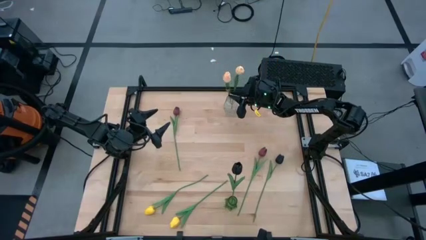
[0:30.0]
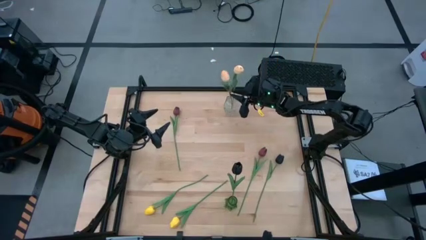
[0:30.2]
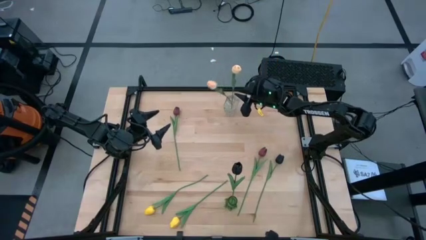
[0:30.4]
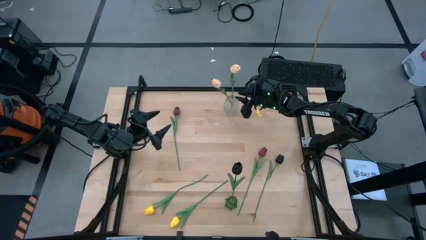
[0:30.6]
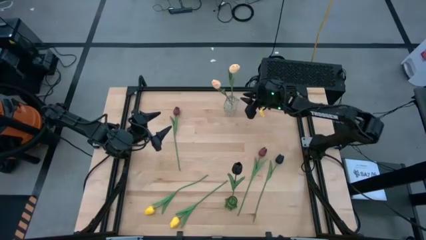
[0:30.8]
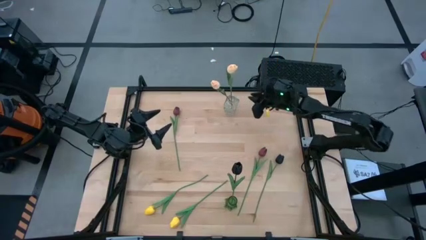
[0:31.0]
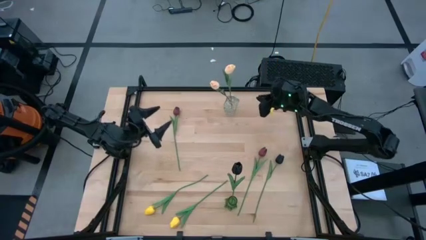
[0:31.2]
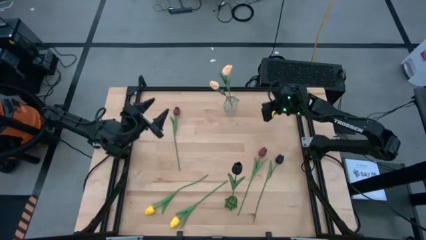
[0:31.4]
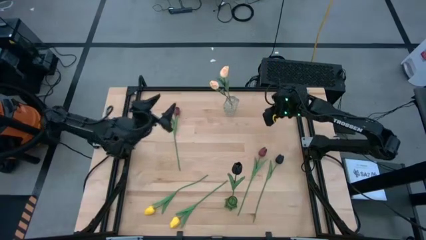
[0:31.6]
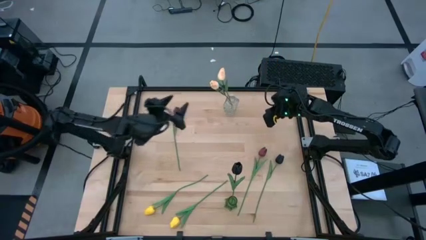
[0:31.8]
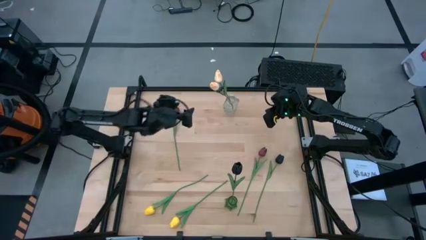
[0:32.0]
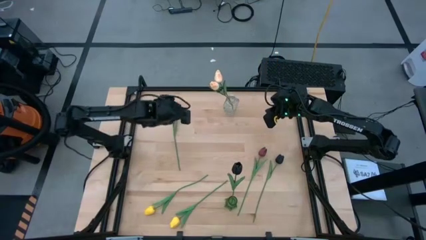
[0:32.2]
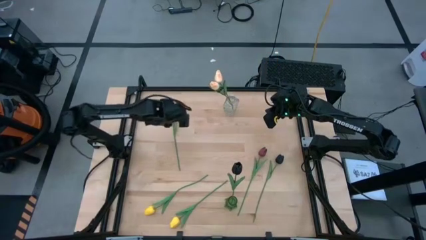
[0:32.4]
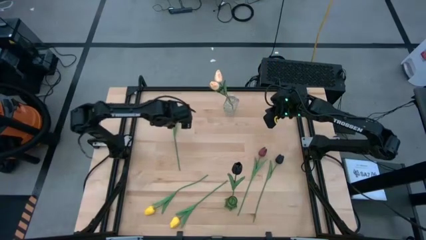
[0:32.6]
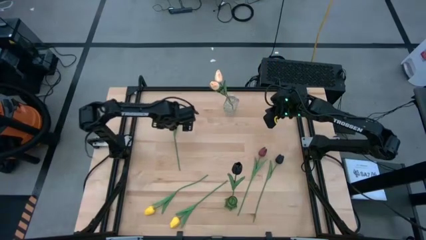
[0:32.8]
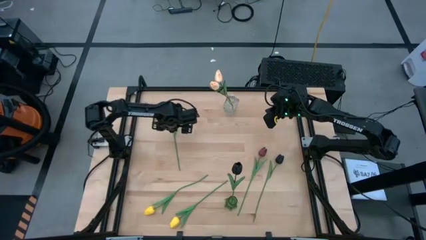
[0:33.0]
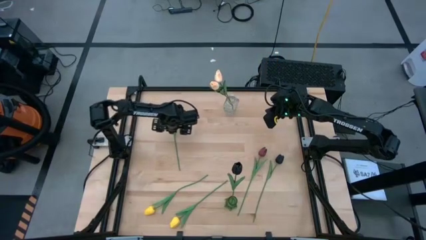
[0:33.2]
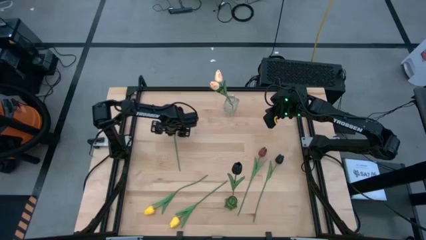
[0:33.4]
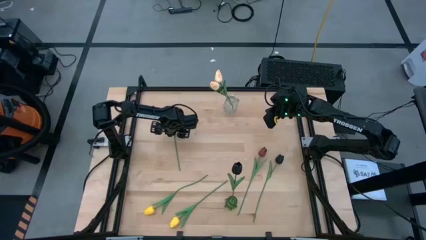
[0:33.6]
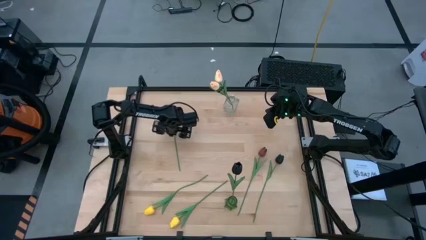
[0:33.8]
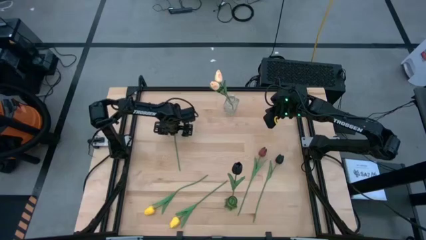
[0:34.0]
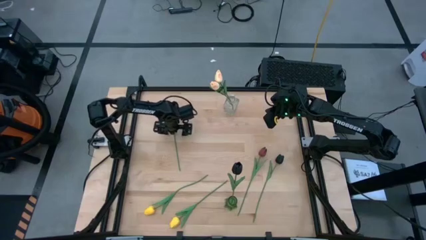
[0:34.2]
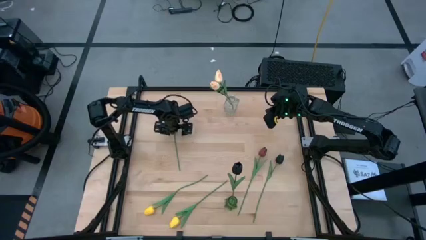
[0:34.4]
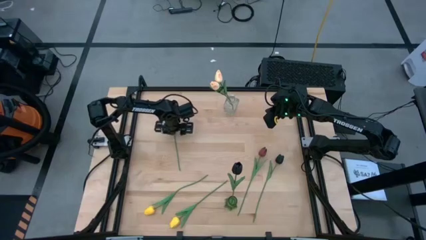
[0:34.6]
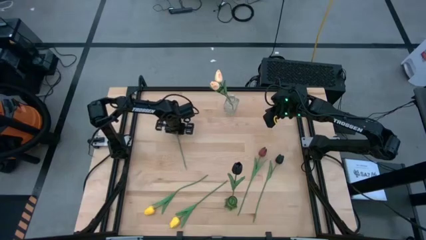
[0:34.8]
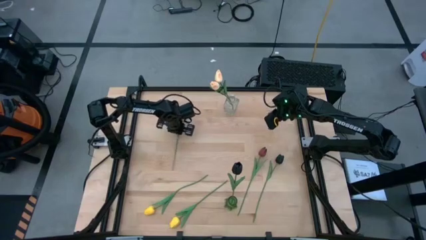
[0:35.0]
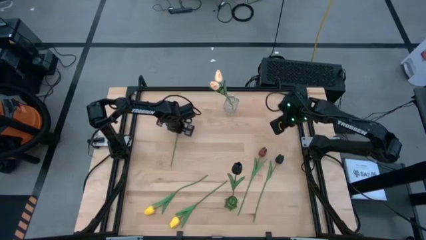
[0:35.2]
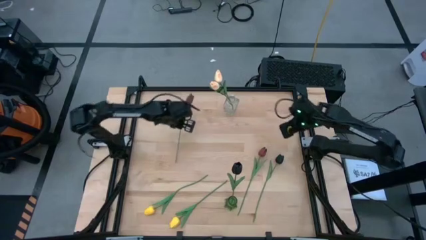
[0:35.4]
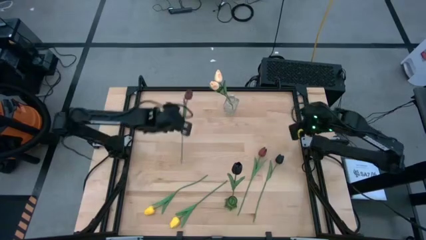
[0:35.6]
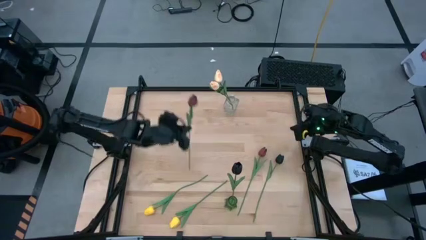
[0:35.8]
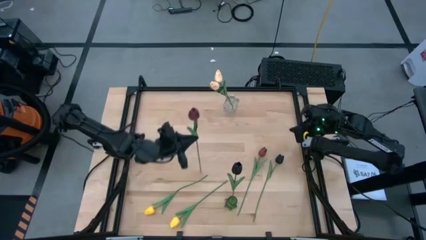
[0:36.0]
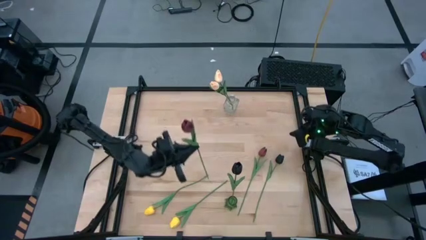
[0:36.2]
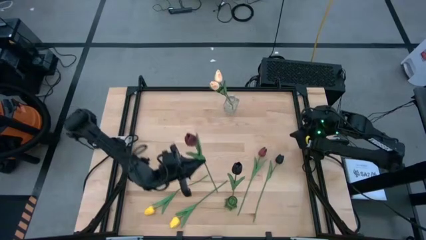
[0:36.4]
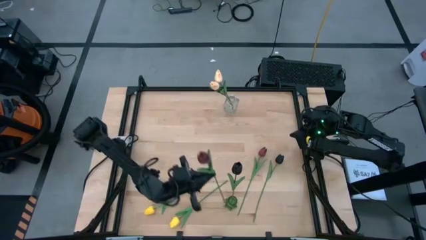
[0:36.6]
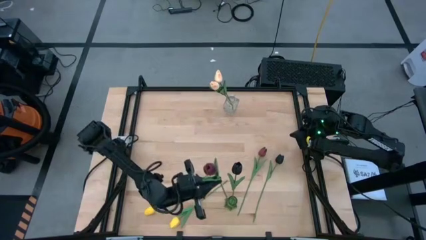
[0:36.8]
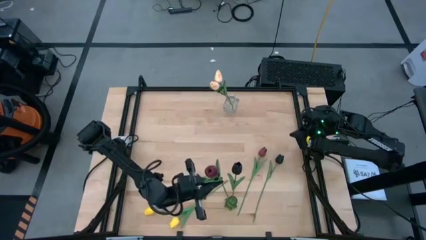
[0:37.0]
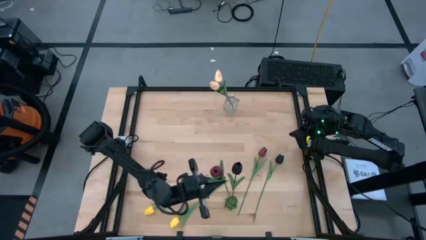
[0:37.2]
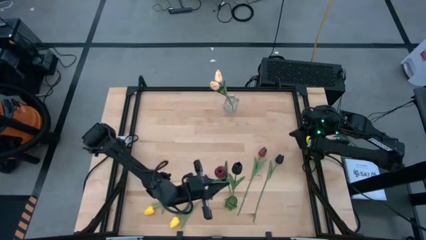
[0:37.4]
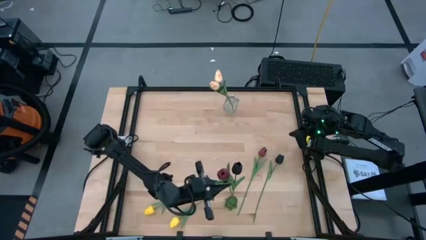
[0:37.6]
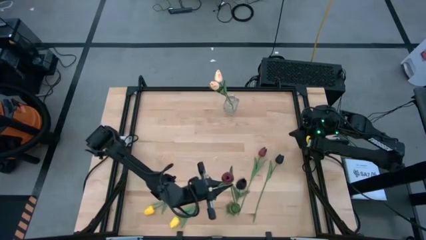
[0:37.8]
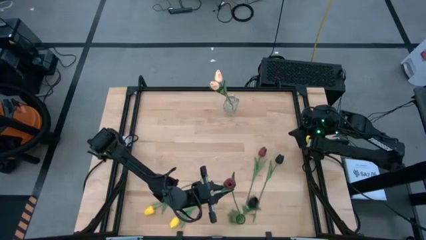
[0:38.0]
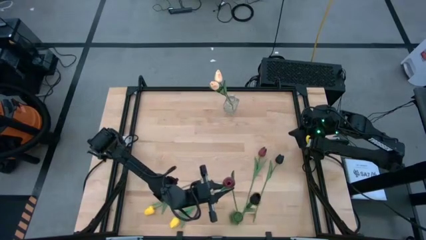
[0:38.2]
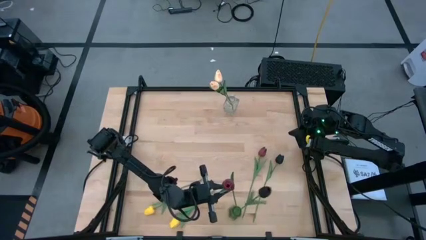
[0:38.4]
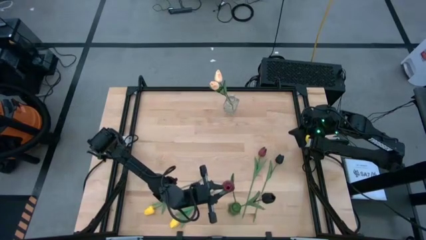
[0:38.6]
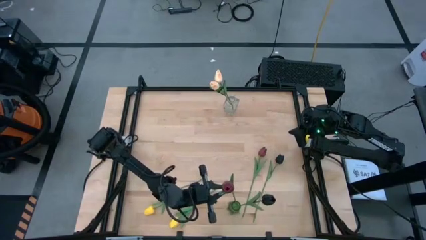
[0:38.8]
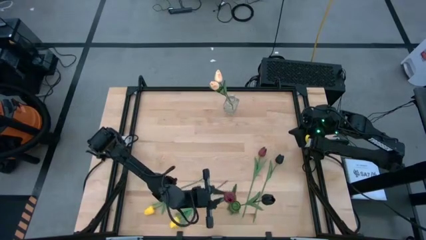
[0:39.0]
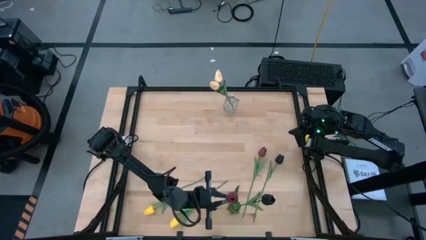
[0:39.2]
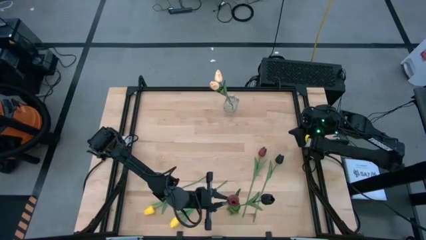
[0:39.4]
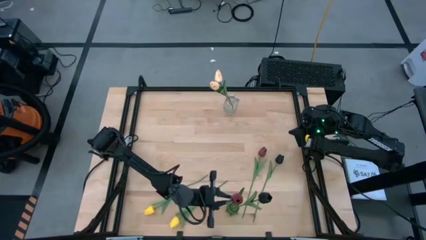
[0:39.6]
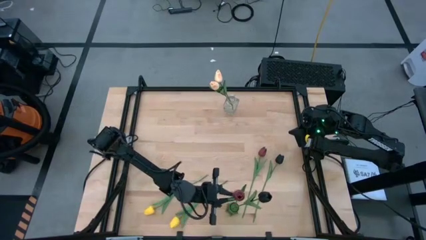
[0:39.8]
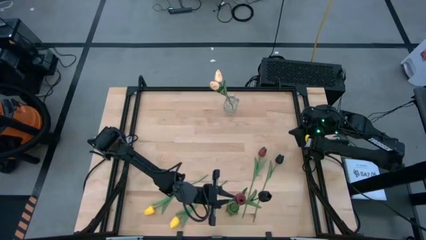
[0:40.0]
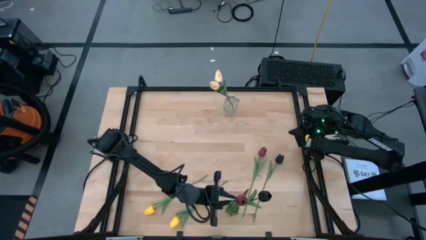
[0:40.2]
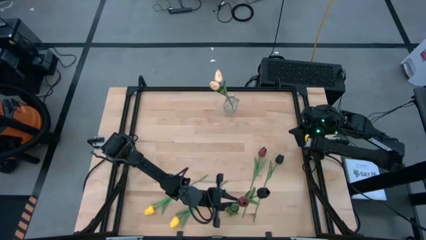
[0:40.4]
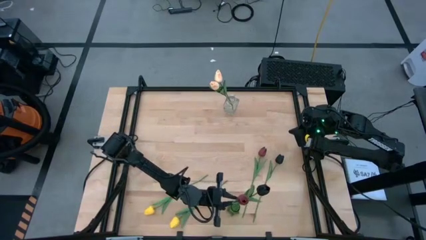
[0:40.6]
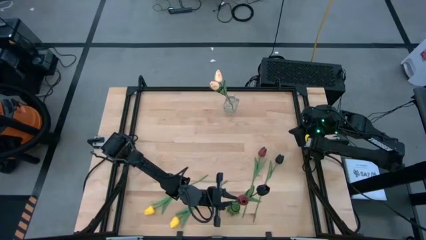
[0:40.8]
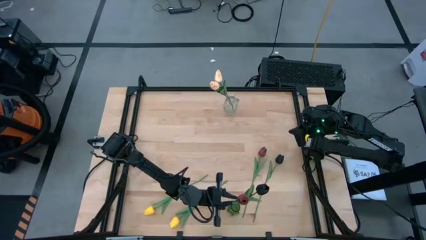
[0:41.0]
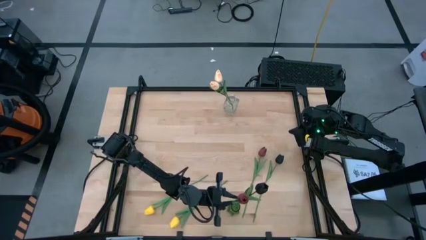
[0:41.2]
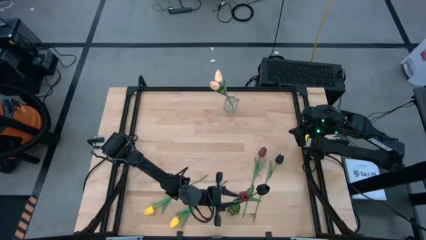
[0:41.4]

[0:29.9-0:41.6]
Task: Sort flowers into vase by color
Put the left red tulip into the green flower vase

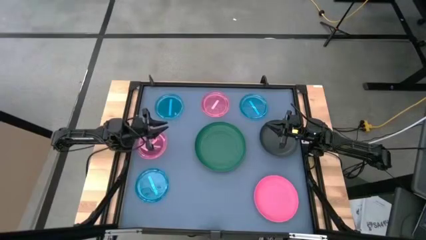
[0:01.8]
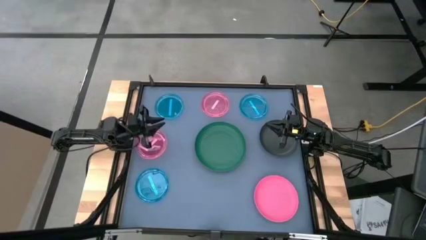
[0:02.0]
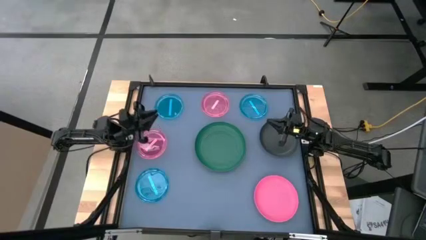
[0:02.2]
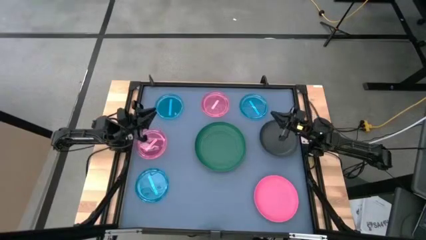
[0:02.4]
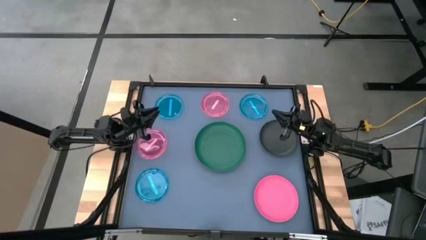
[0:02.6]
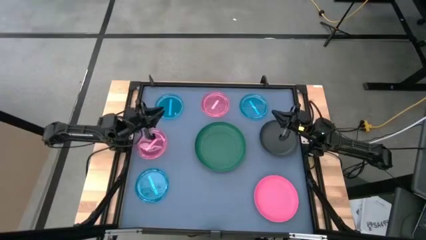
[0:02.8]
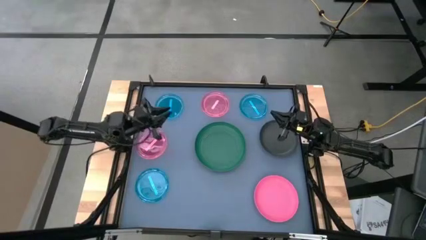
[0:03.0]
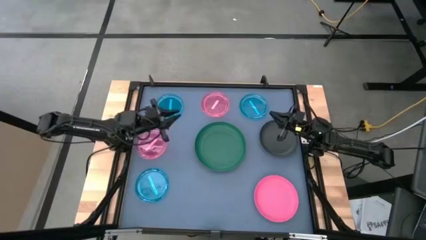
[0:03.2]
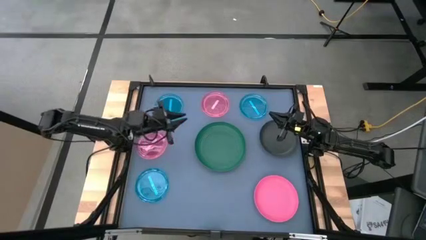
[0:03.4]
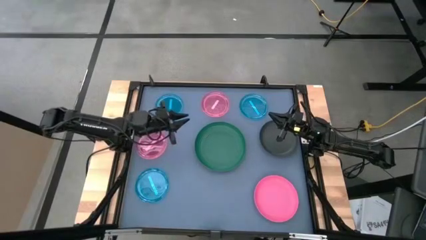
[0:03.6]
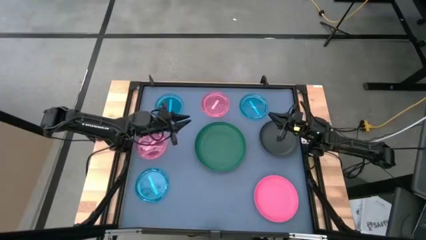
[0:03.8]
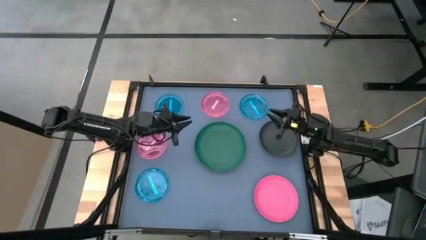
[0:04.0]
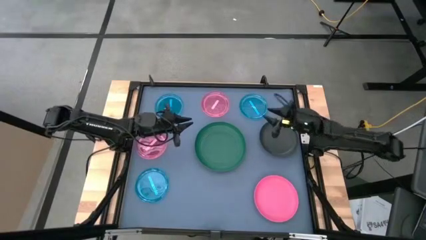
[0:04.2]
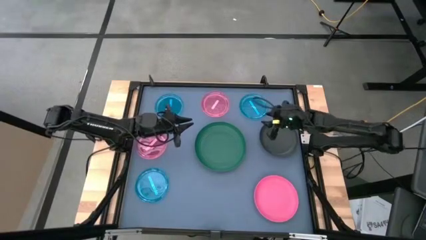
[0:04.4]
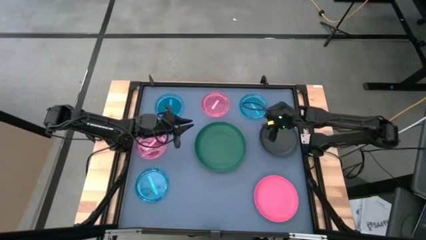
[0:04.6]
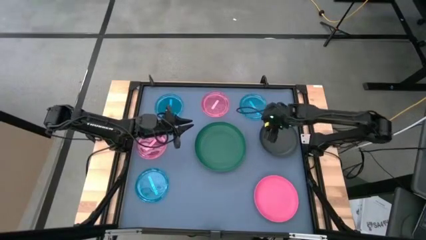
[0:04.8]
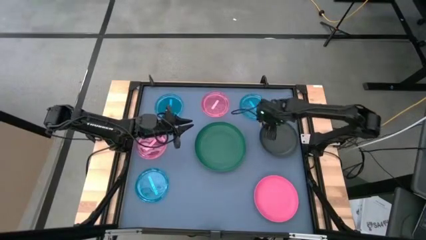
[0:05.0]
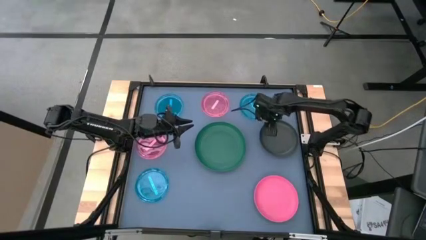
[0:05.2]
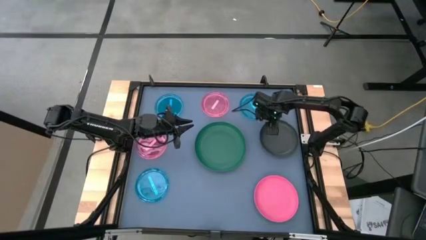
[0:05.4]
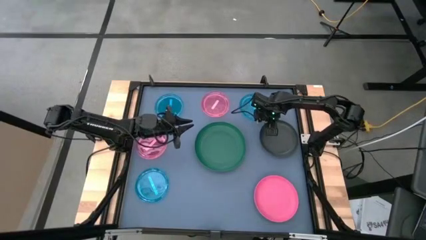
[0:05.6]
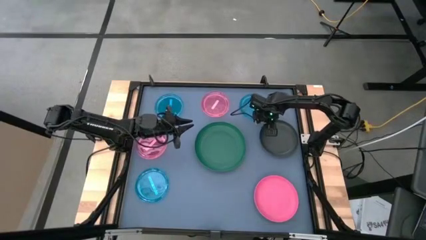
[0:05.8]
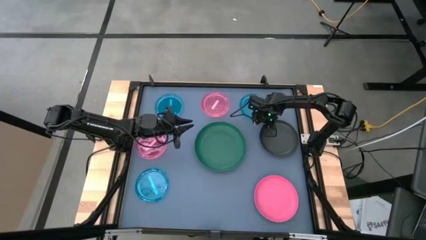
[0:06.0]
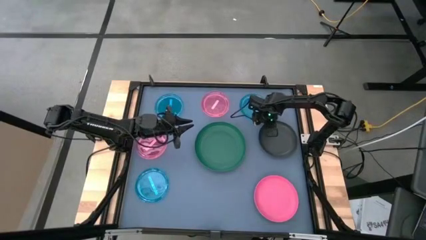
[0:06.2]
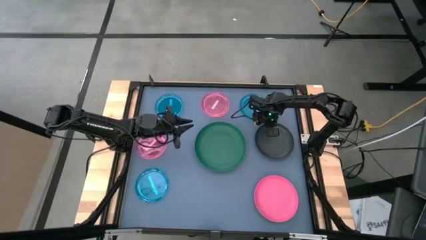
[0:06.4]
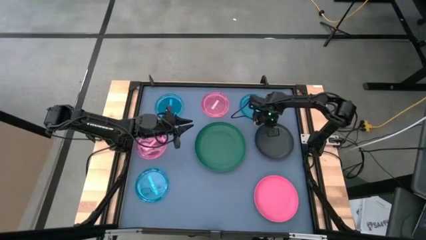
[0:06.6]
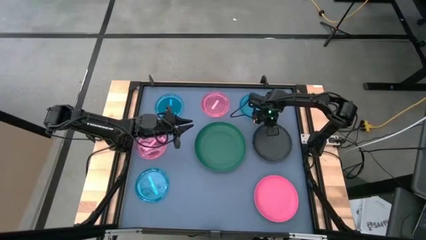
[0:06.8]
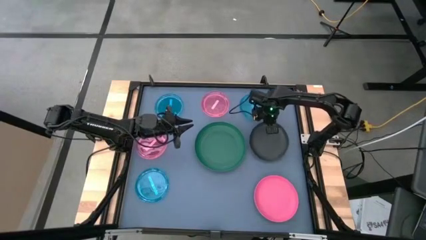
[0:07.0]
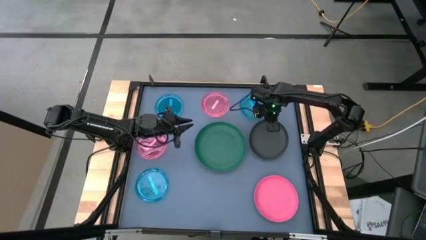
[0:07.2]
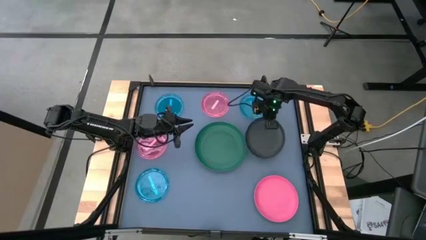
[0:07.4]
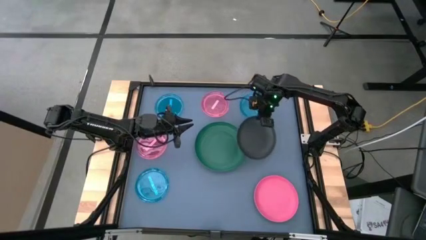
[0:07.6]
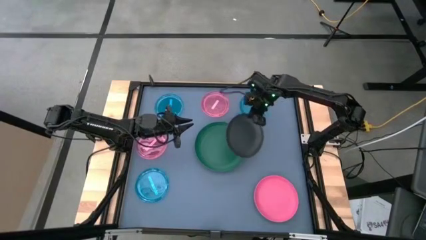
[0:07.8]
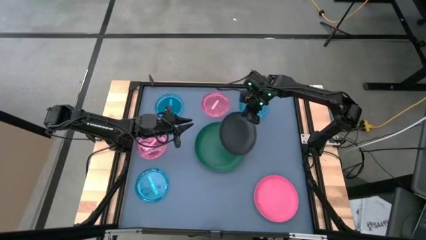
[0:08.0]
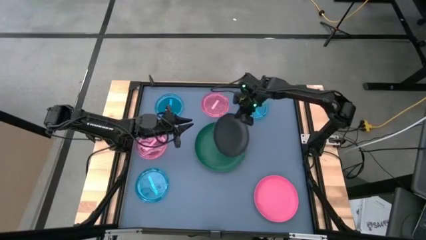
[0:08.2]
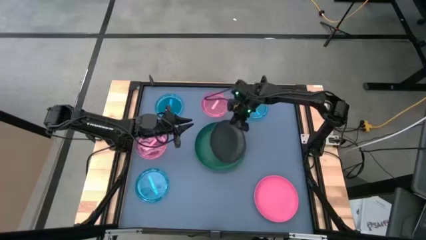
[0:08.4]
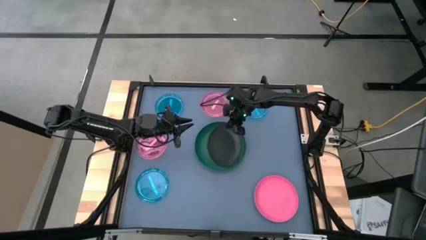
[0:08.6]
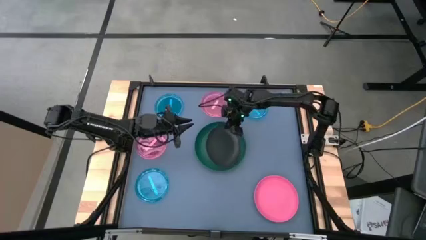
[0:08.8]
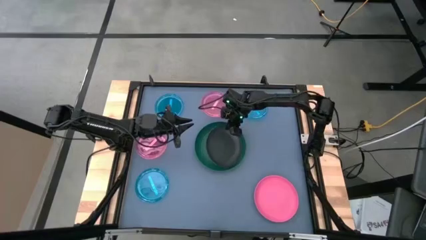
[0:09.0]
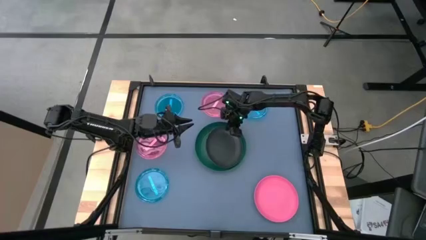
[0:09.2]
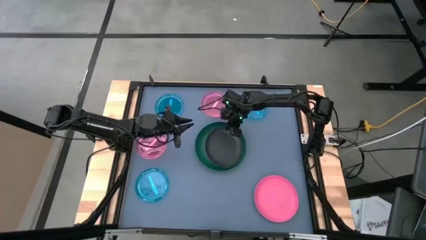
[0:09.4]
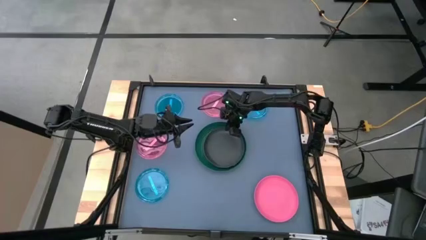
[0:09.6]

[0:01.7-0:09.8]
Task: Stack plastic plates
Stack the black plate on the green plate
